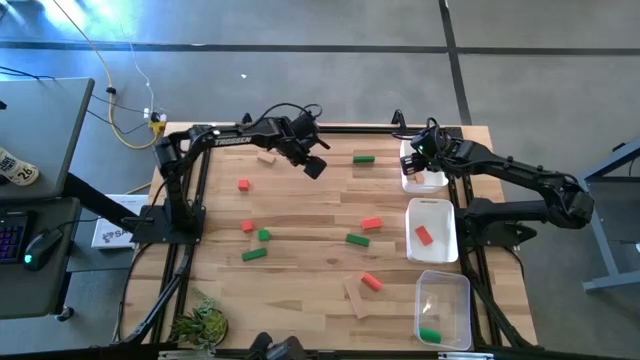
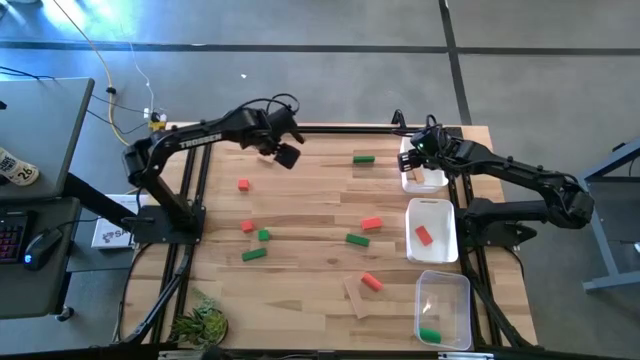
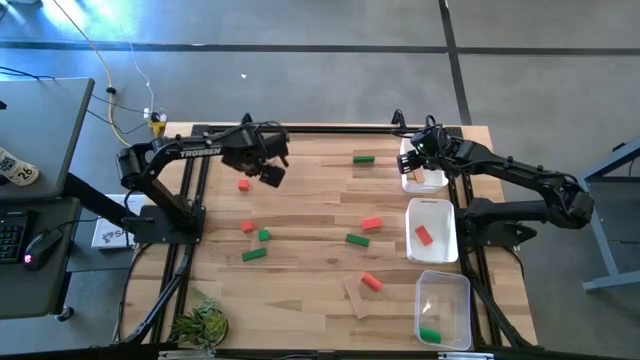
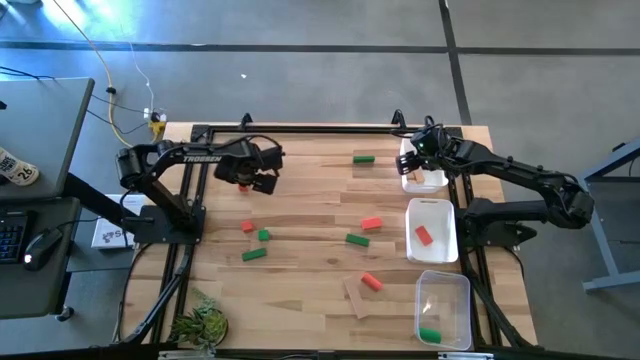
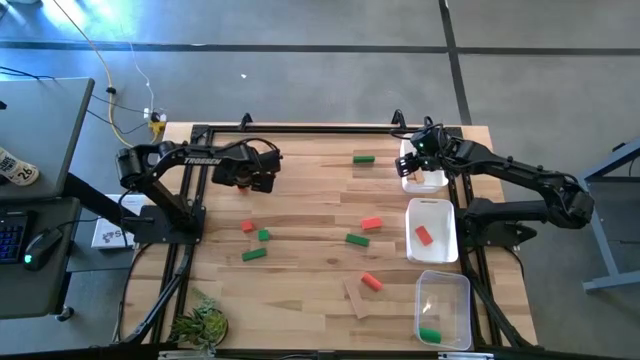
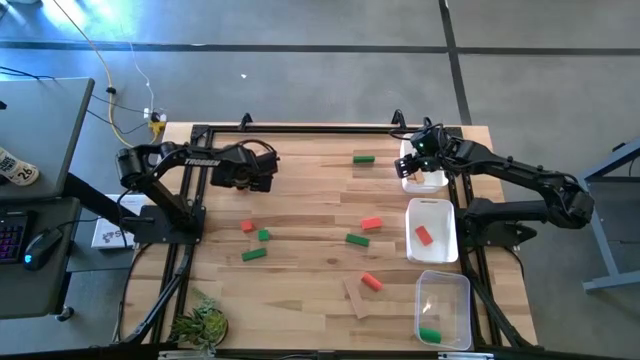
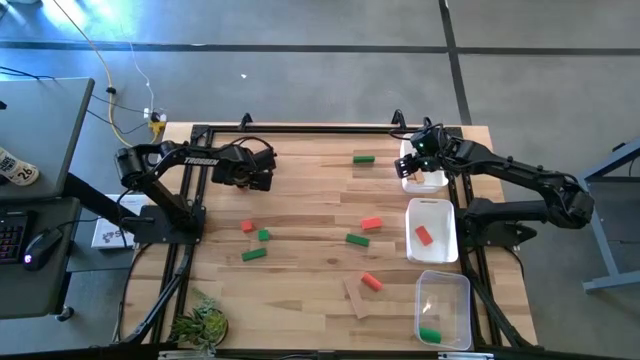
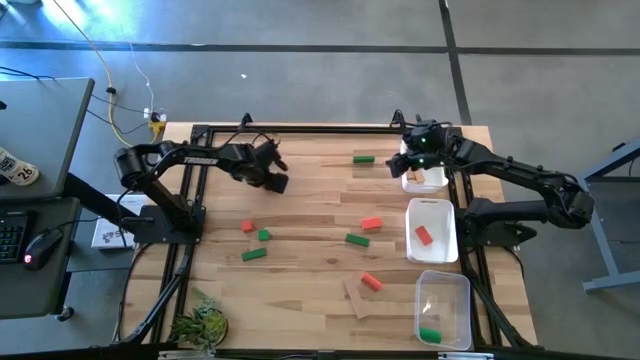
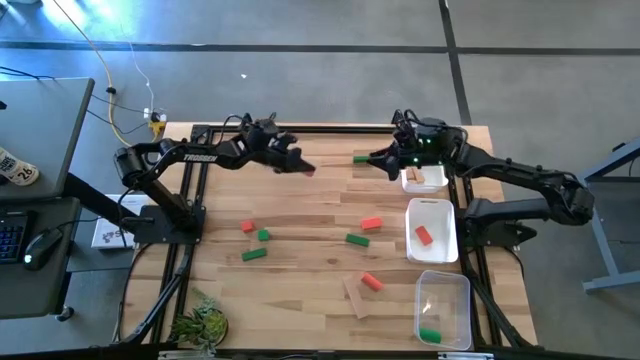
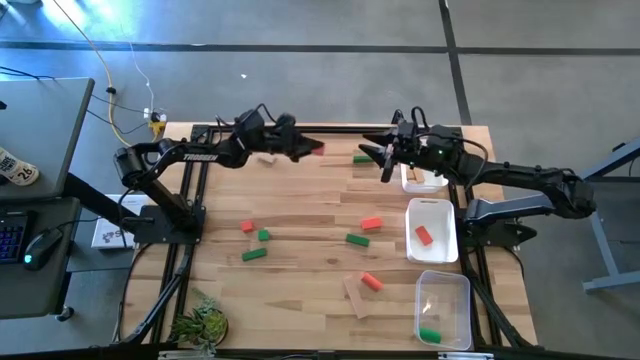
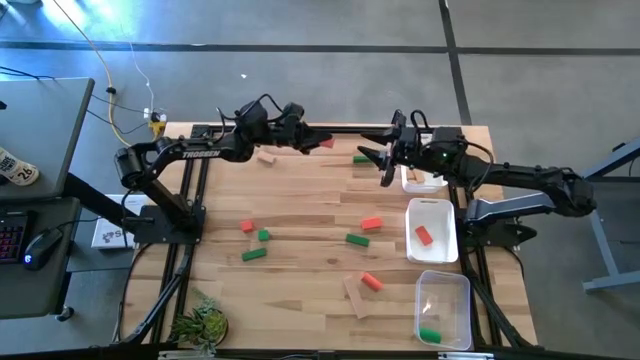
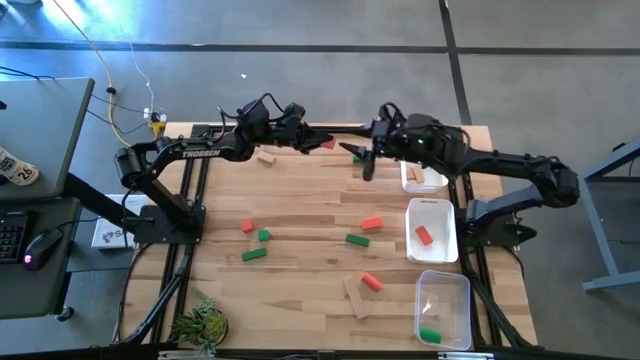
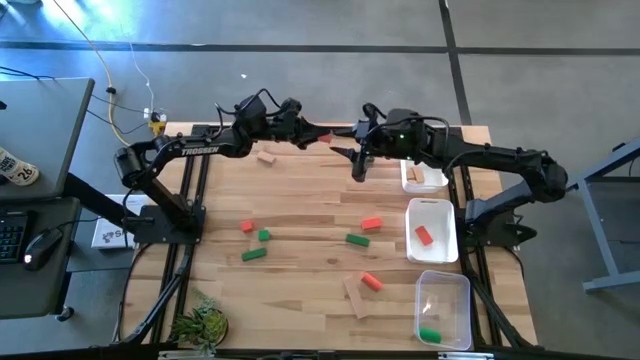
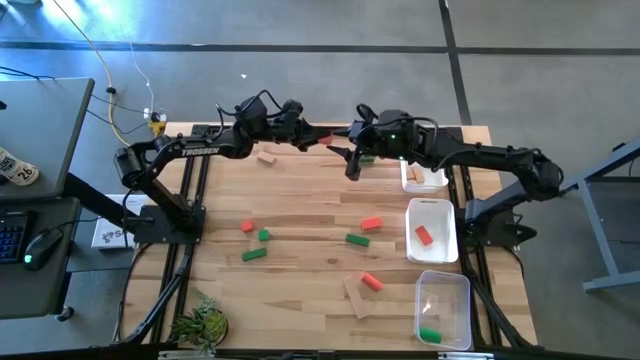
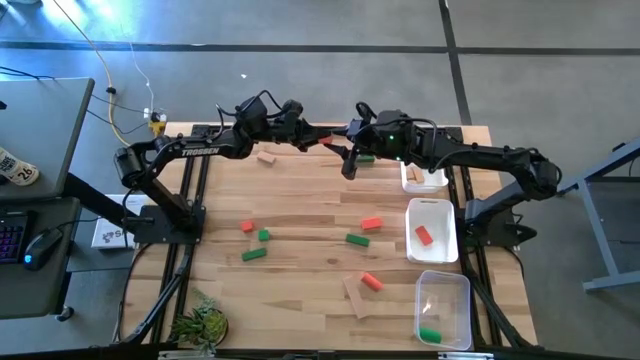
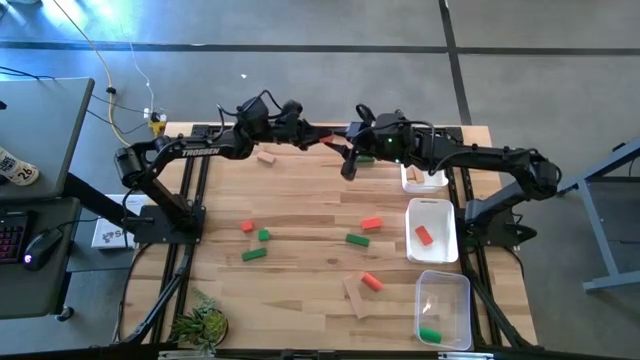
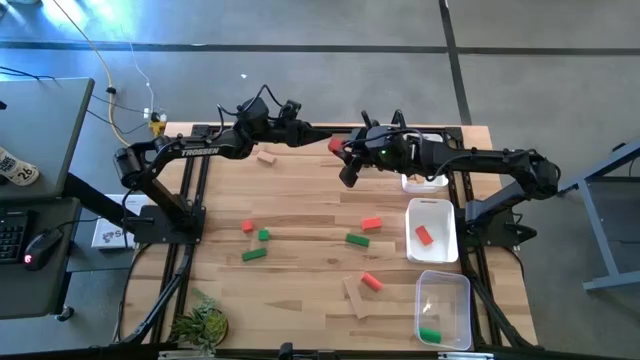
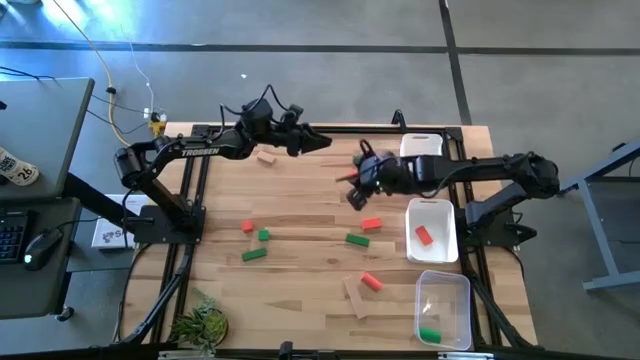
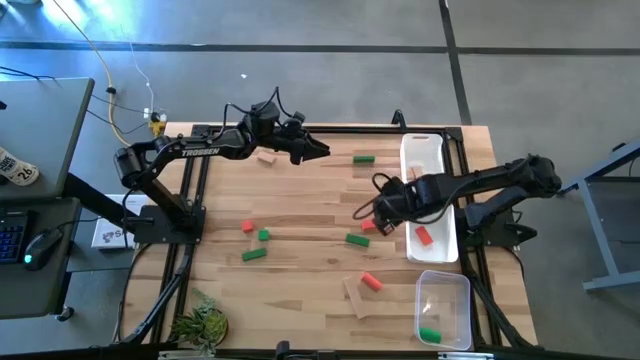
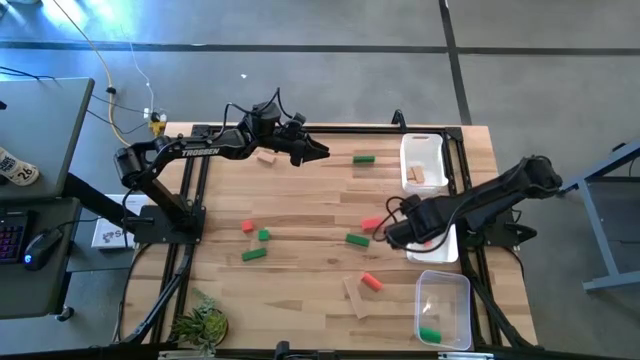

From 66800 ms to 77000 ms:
Task: Sort & place blocks by color
Put the orange block into the bottom white bin

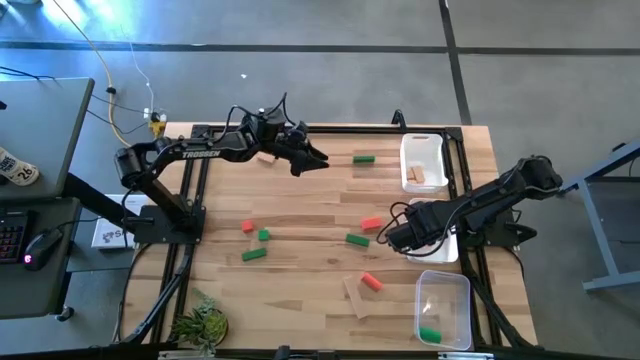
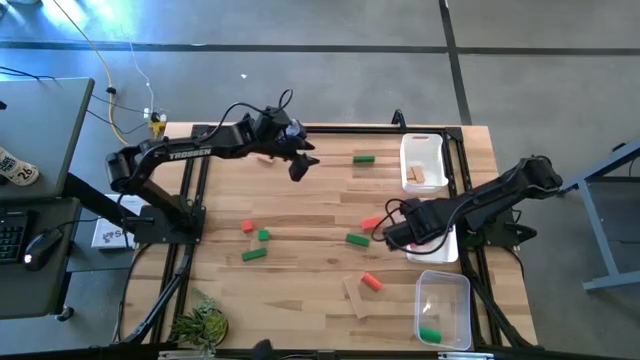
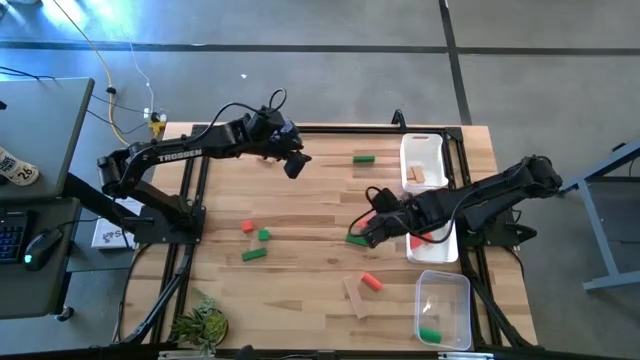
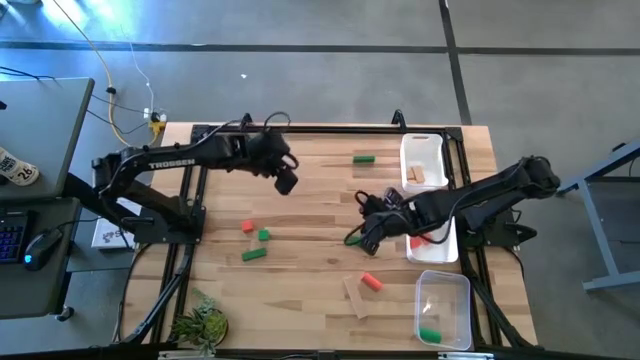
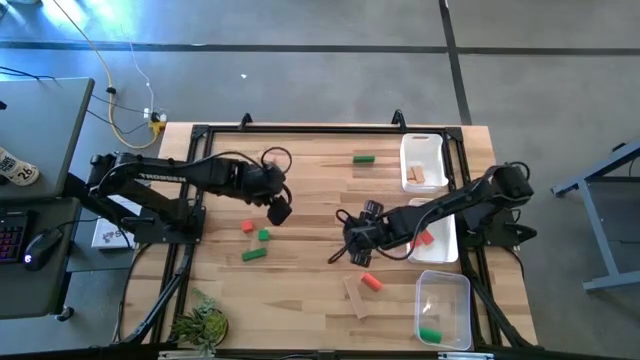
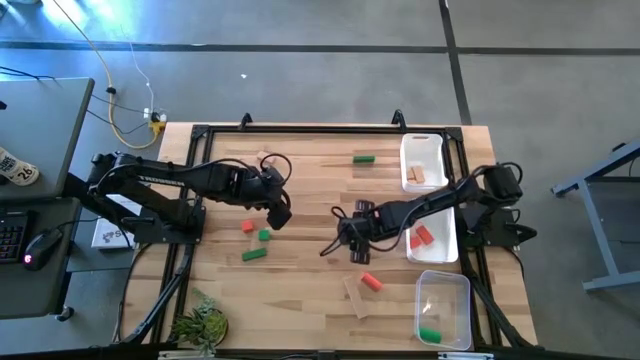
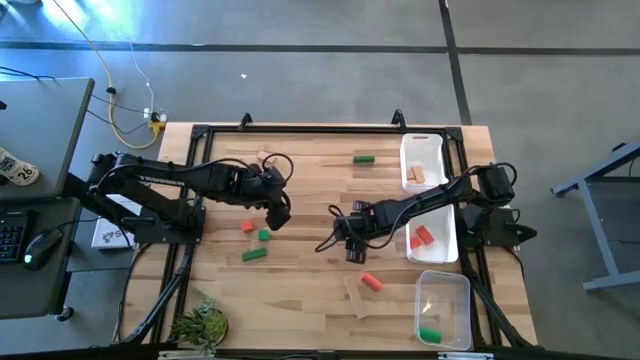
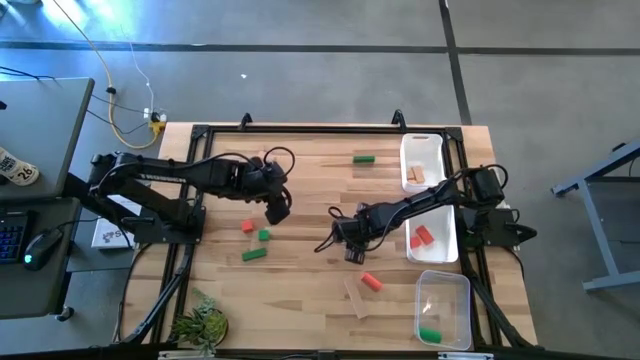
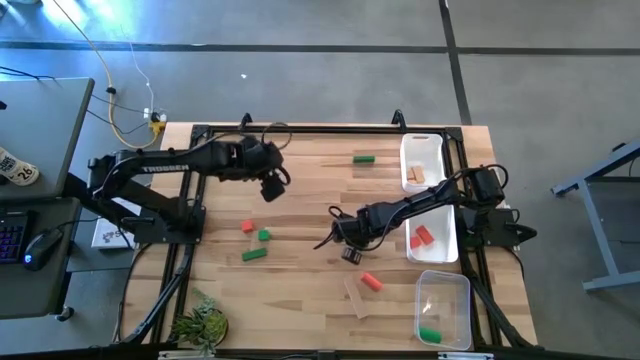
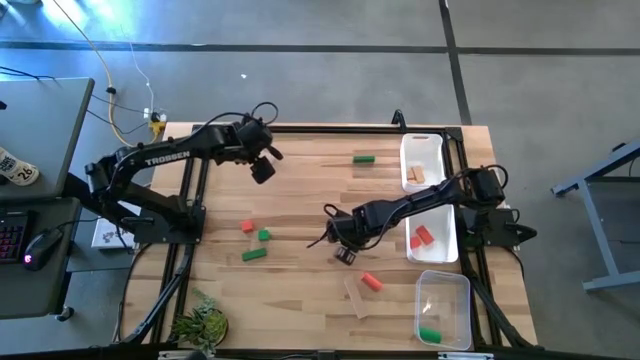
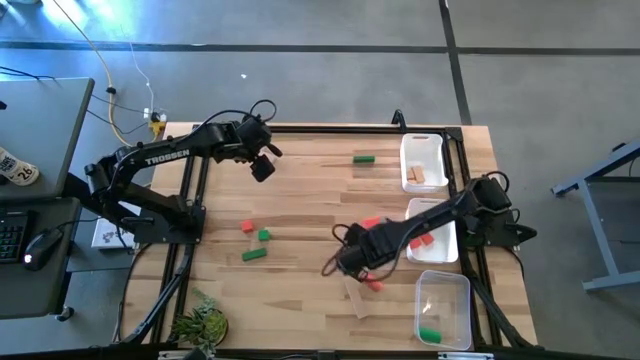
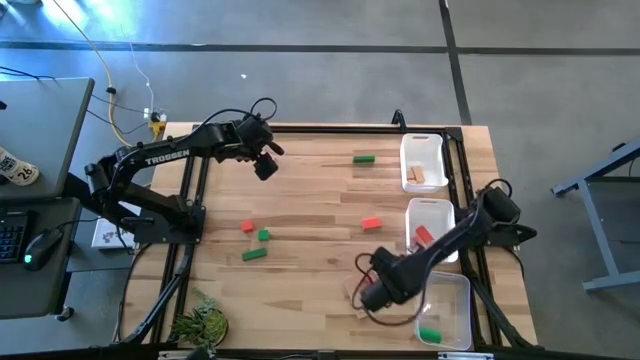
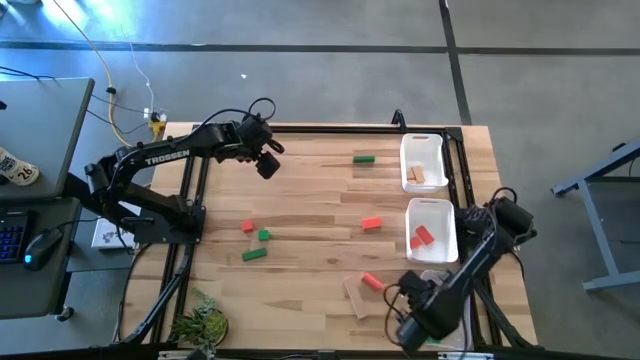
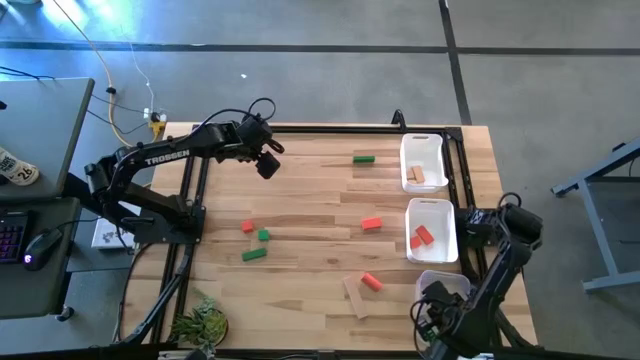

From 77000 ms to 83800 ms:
Put the green block into the transparent bin

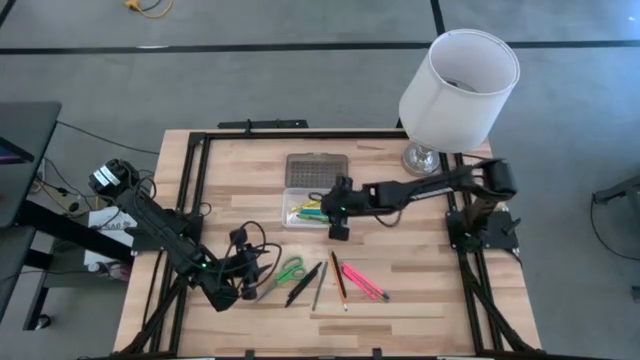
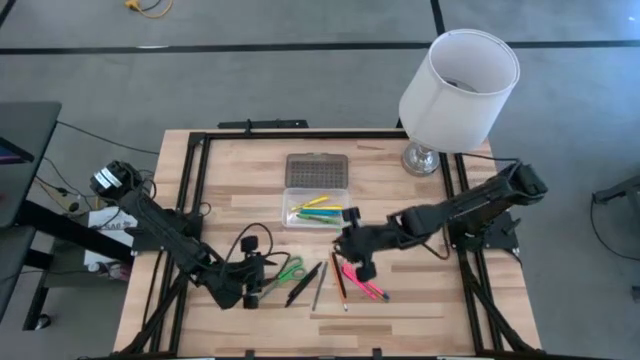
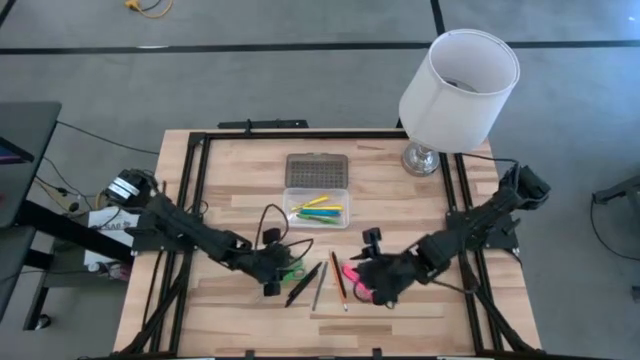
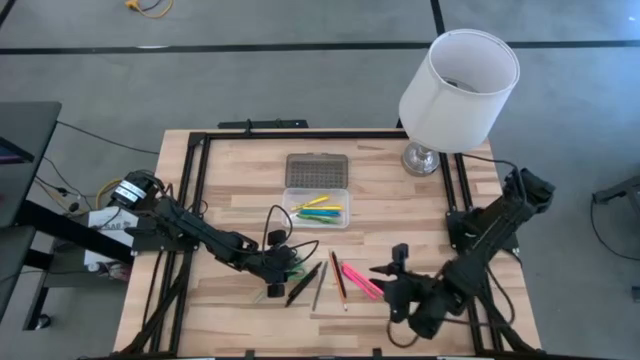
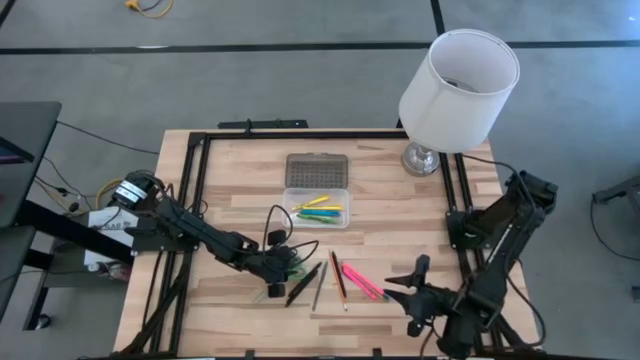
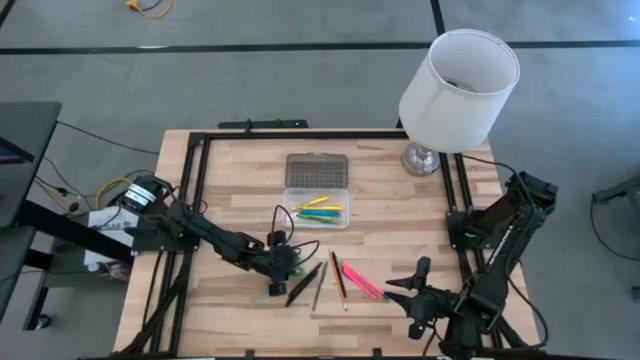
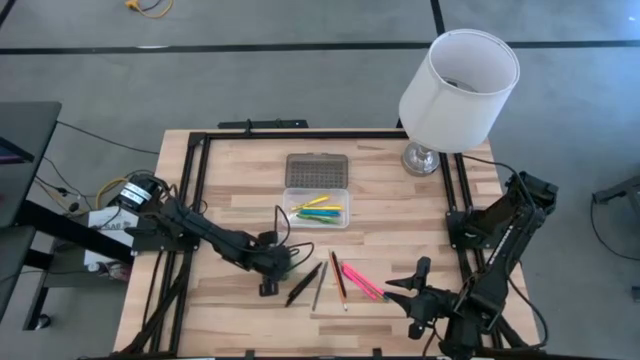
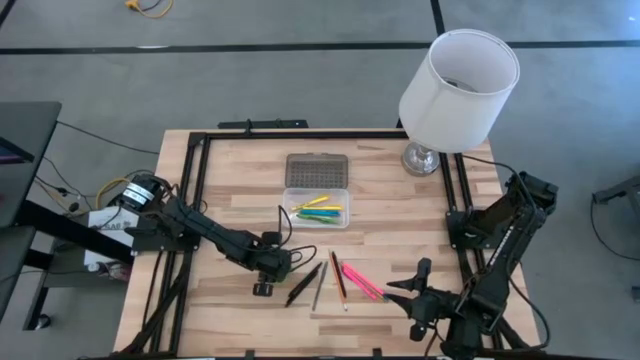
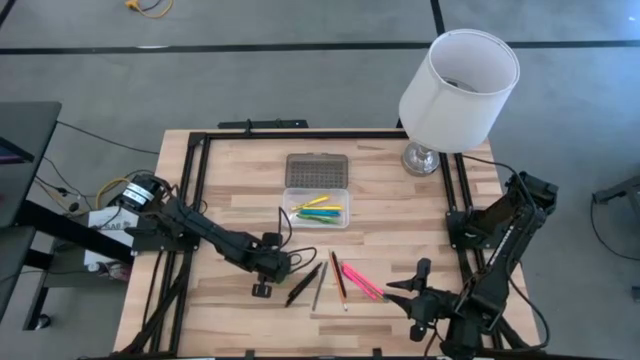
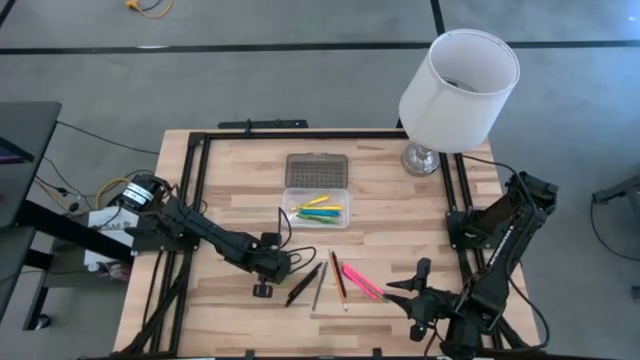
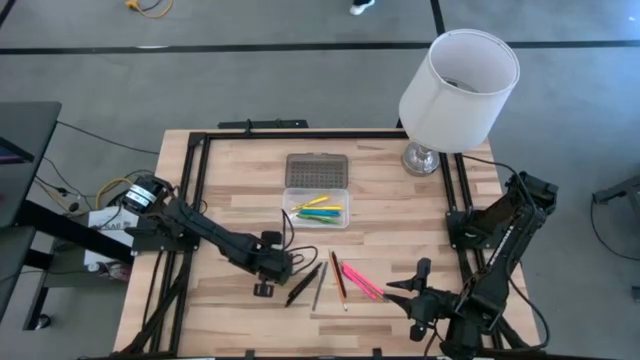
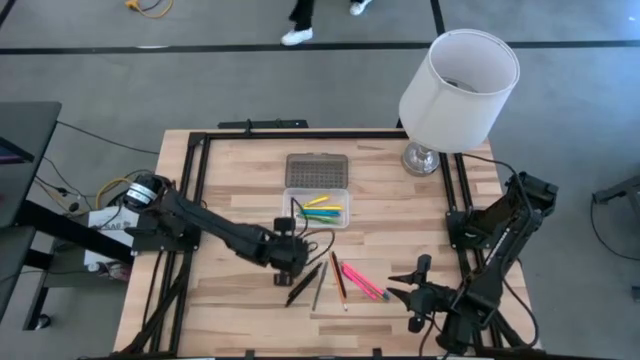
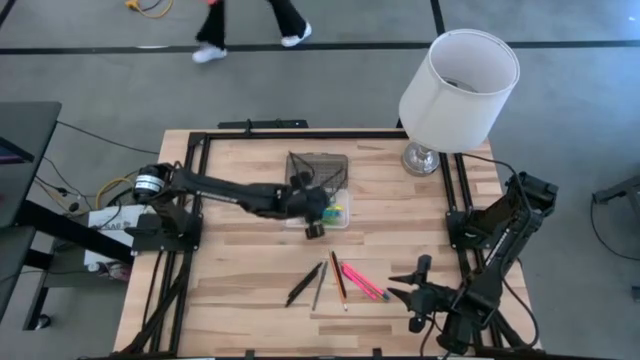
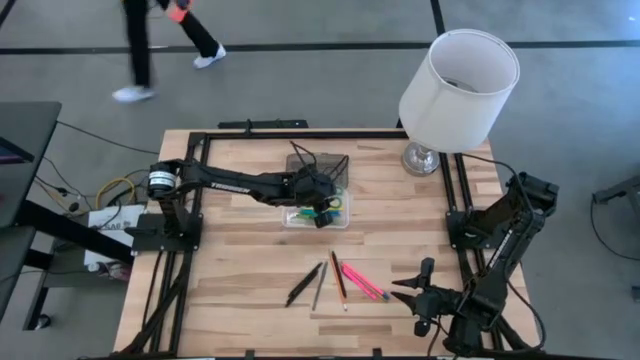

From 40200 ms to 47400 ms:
Task: Pick & place school supplies into a supply box
Put the green scissors into the black supply box
